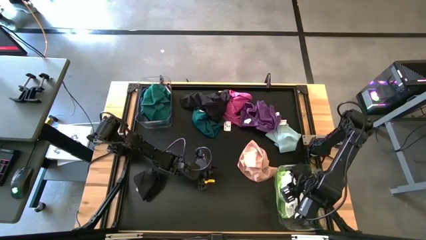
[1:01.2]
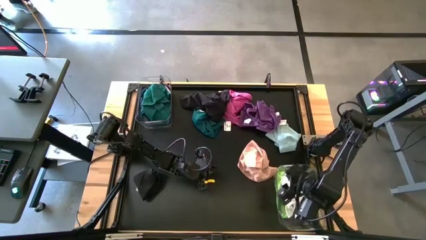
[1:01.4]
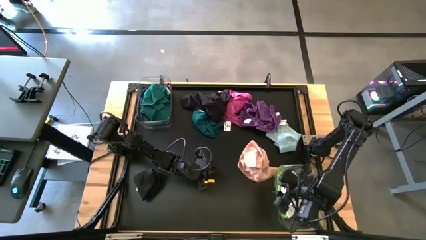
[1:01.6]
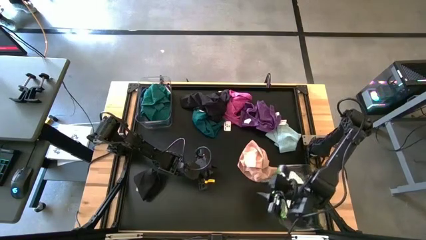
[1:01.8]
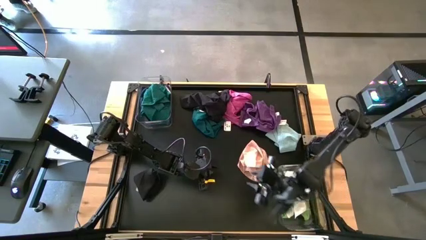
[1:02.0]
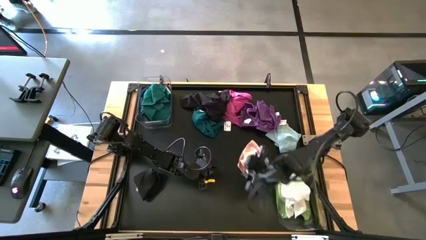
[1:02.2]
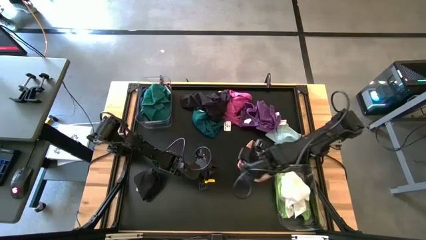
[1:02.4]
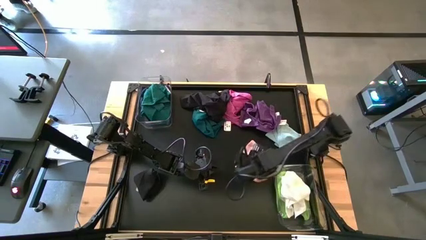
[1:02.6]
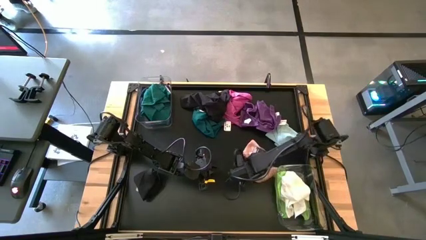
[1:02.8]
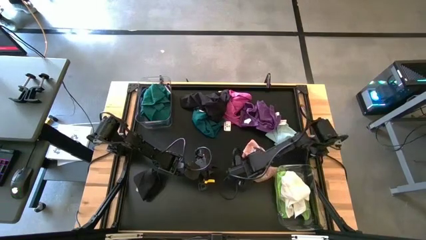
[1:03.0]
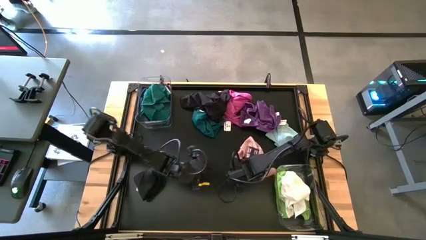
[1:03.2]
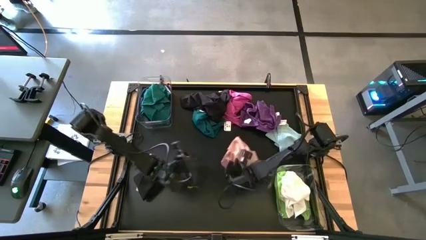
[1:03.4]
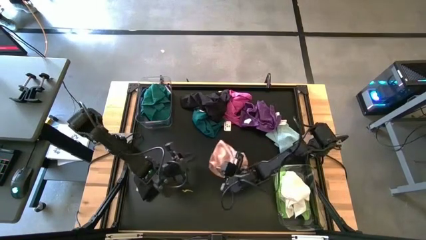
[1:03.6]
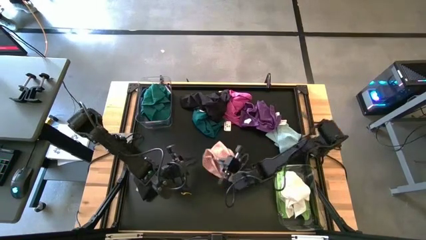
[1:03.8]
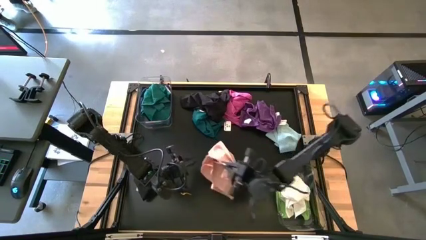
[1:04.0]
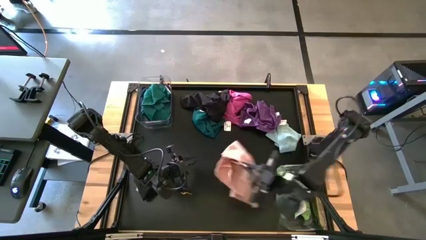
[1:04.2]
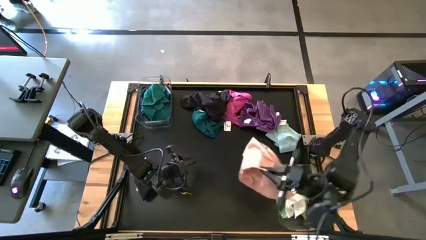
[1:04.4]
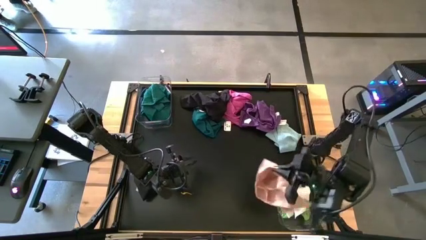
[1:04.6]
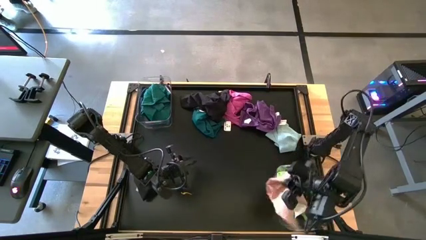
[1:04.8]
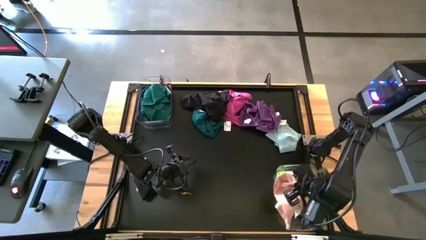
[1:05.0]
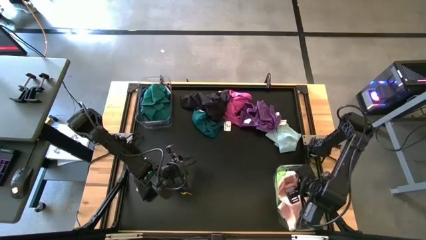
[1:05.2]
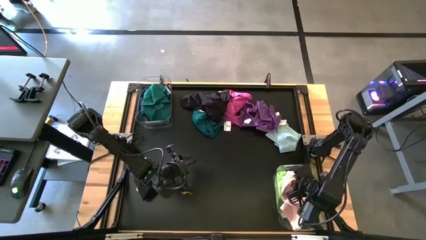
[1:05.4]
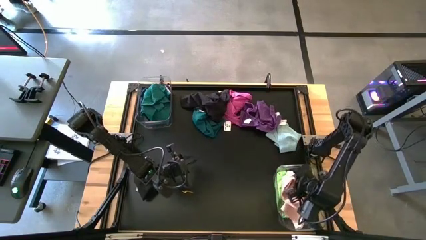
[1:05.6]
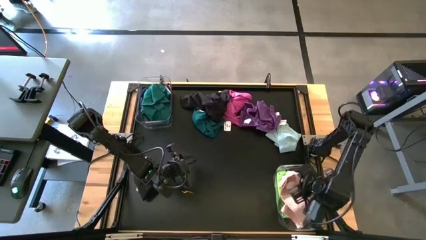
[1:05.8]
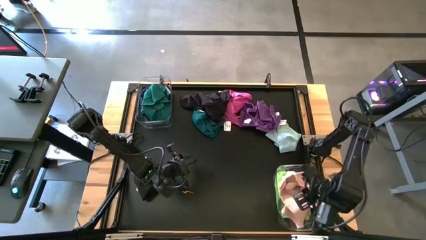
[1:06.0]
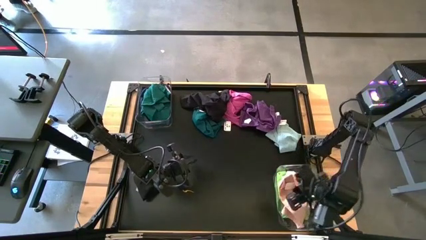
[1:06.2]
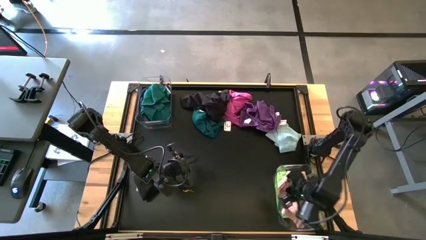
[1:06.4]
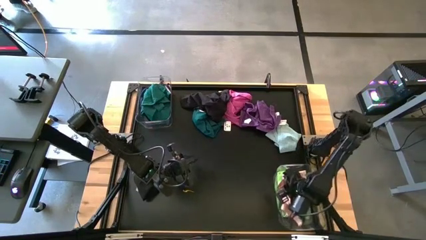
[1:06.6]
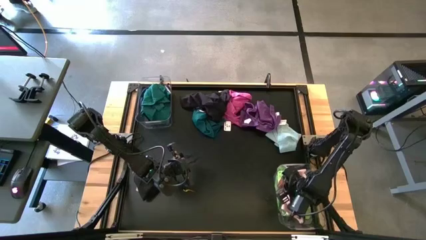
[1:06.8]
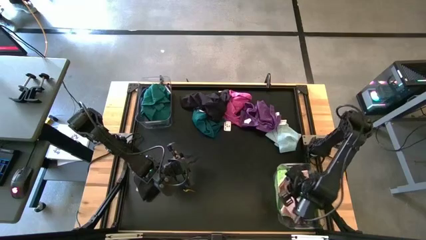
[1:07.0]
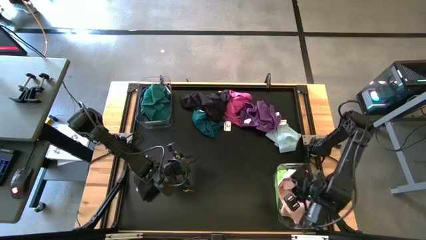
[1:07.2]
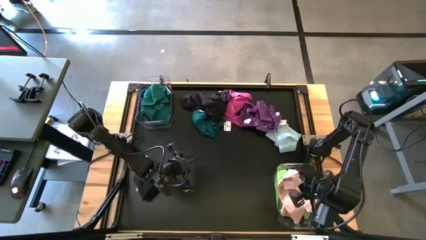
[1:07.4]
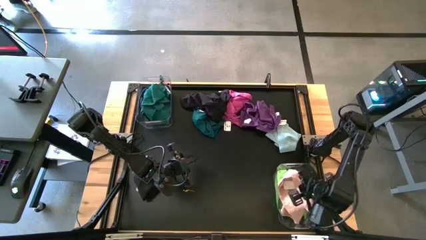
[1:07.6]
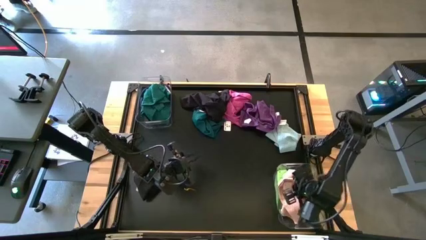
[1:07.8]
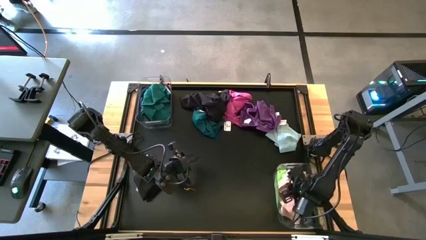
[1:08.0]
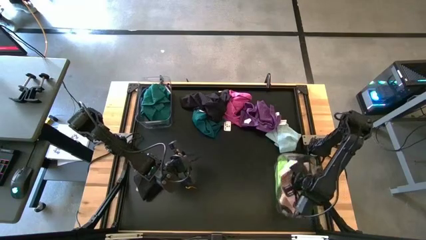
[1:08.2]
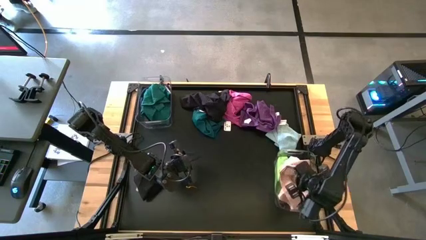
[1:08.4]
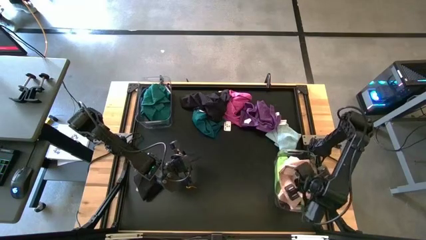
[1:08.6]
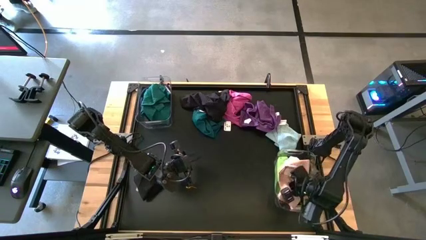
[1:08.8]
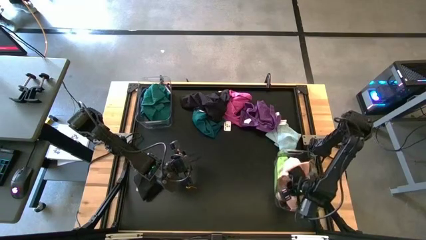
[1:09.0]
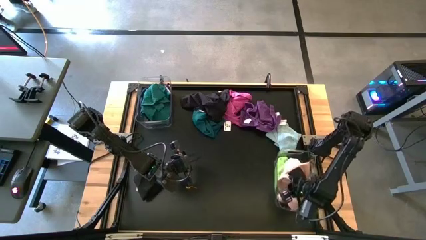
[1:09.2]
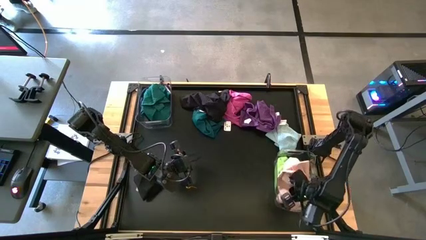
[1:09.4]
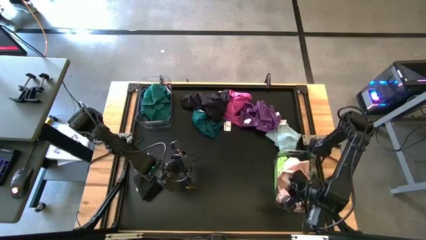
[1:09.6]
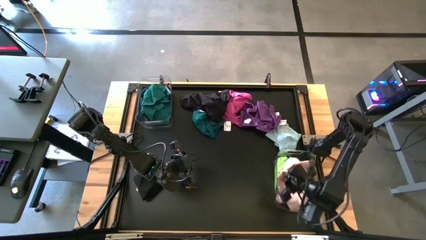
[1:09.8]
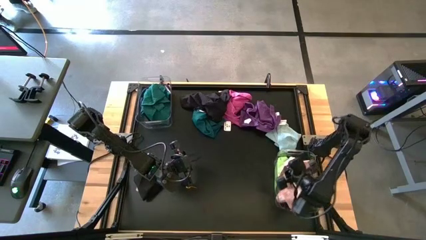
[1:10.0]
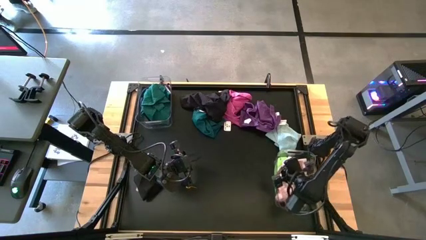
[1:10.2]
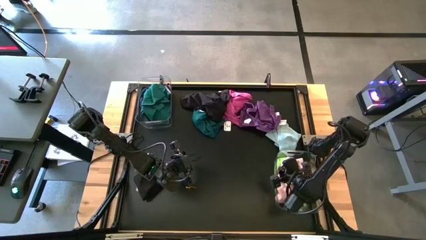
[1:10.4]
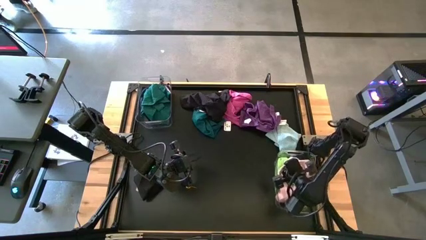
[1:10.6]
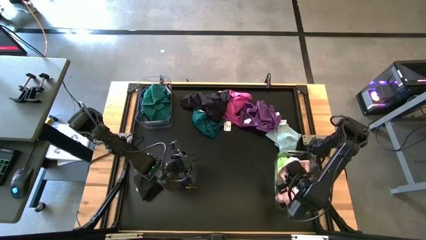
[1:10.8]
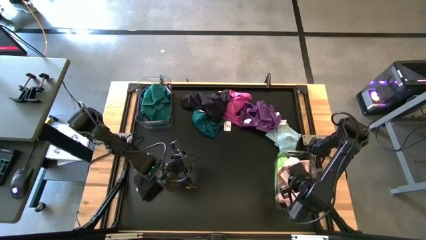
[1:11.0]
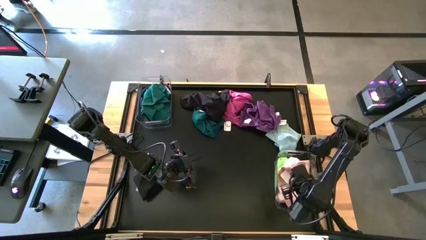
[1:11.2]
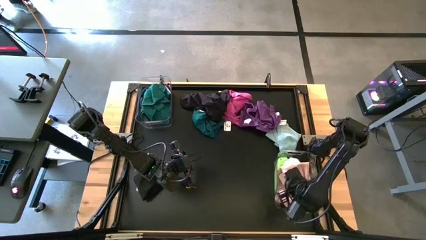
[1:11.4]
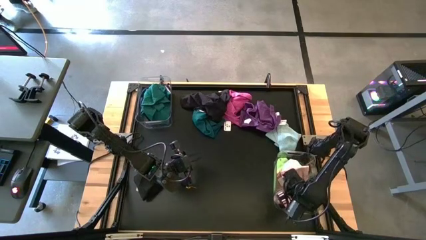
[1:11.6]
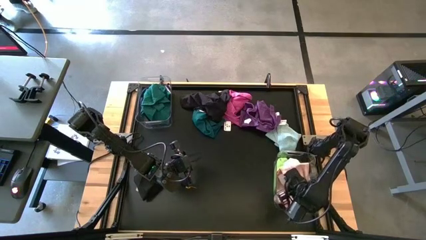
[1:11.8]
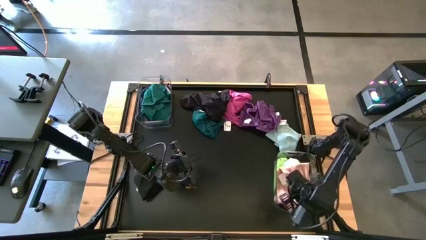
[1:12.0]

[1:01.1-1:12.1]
Task: Sort towels by color in basket
Put the brown towel into the bottom transparent bin

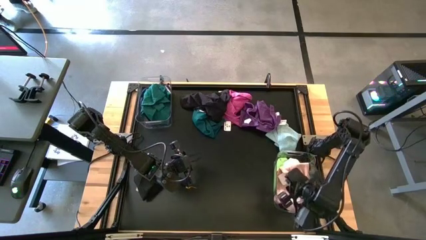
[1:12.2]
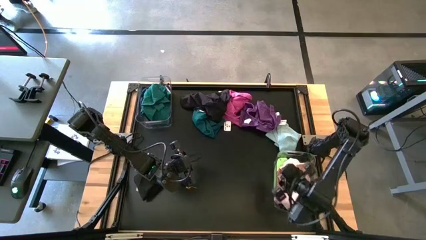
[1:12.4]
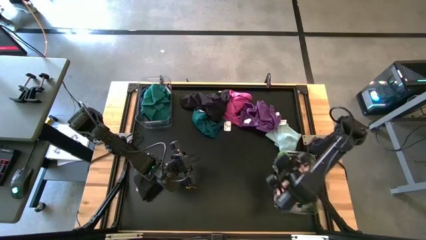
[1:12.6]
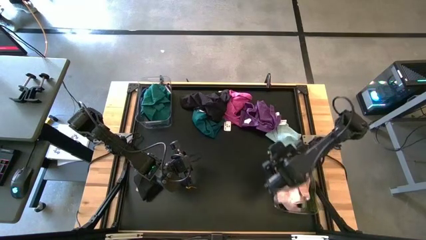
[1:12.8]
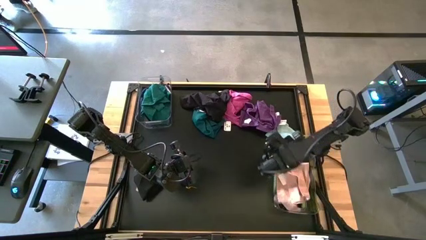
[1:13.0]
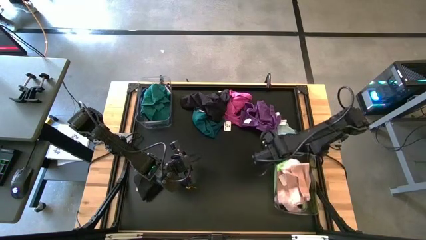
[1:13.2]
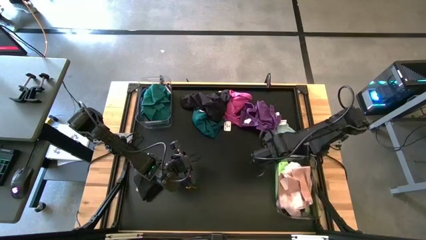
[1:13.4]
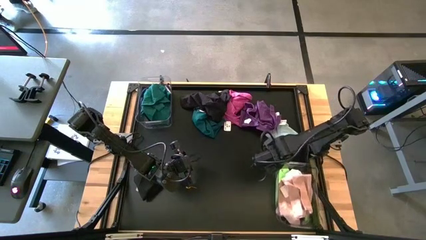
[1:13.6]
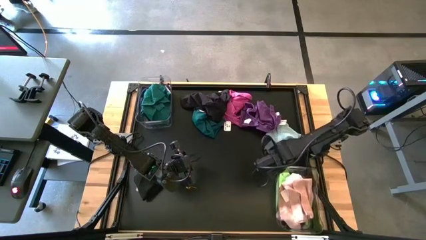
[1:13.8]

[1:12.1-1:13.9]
Adjust the bottom transparent bin
